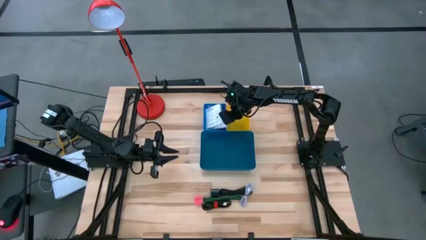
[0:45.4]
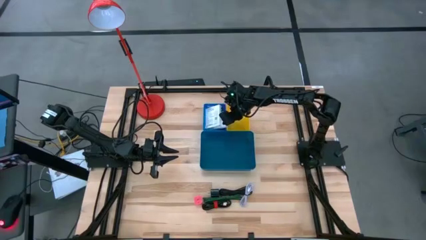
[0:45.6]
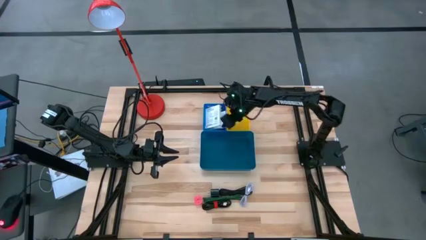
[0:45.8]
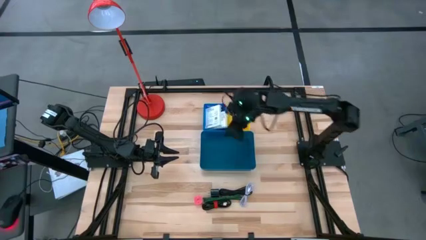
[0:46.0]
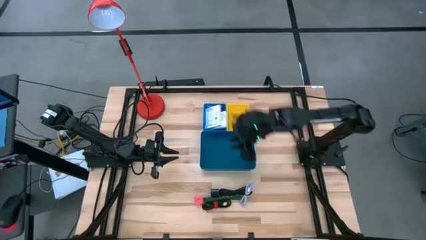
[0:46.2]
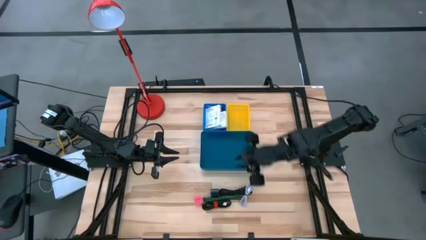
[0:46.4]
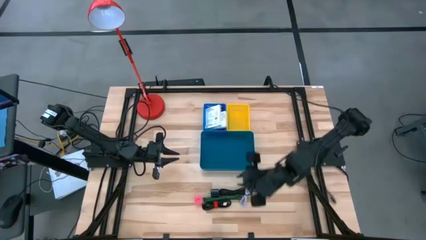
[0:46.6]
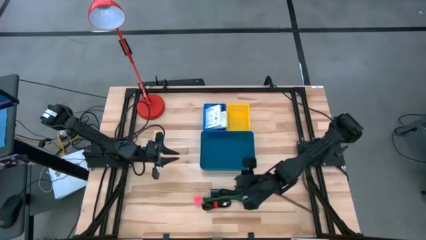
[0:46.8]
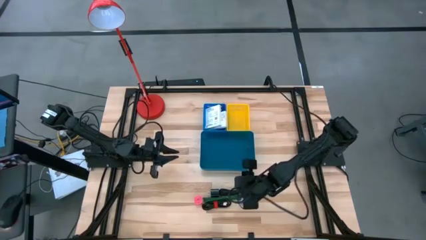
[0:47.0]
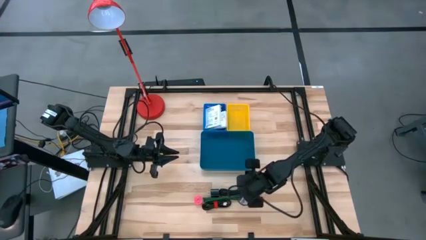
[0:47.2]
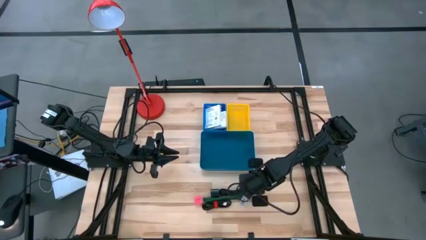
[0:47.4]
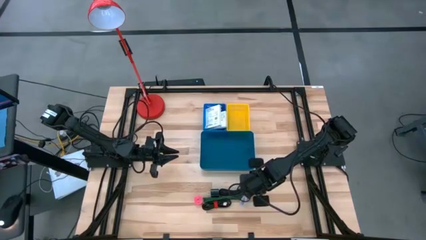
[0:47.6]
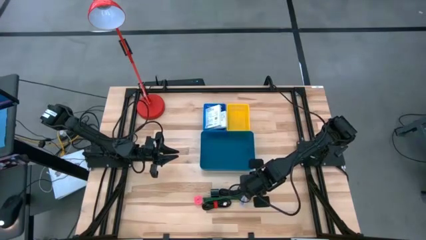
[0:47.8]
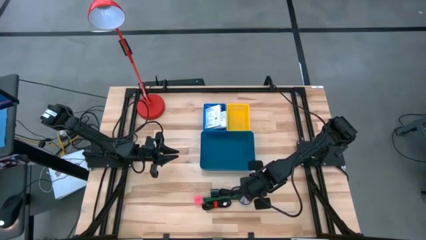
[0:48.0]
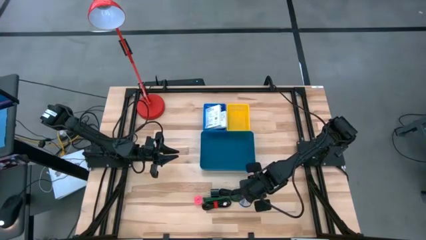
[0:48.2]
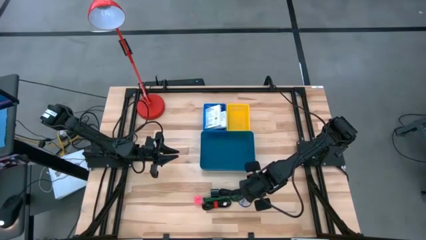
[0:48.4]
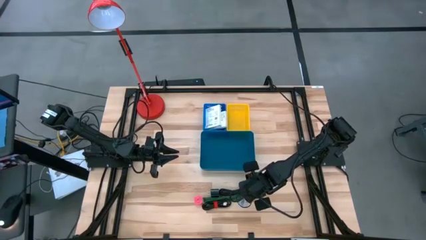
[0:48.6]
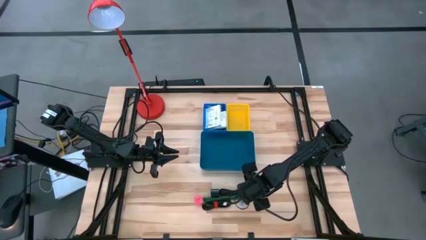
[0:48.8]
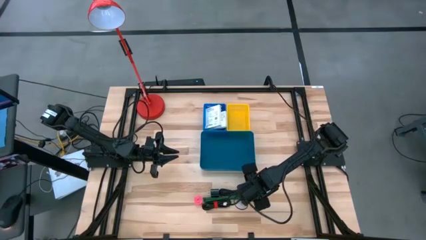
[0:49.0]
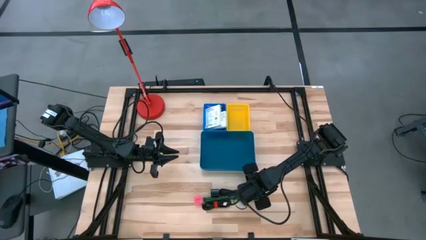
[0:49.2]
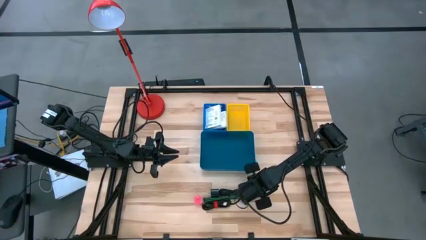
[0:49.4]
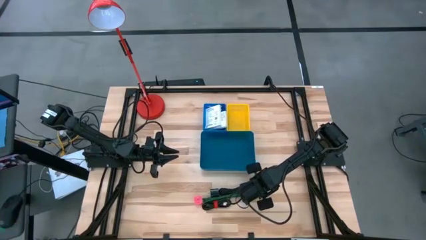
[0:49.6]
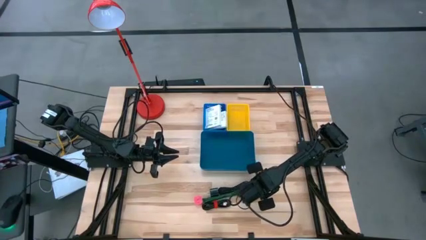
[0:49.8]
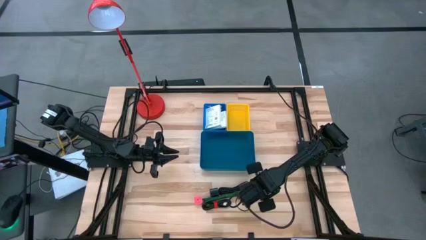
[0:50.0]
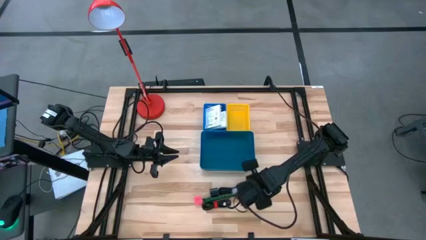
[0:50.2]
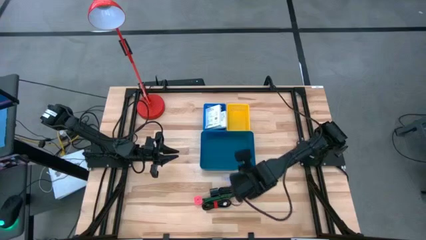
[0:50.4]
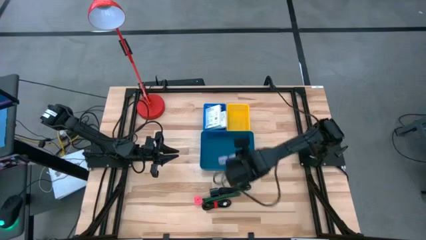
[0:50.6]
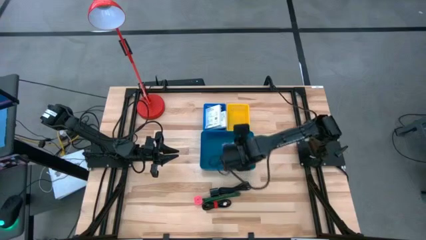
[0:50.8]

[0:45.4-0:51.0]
Task: Pick and place items into bin
Put the purple charger cable into the large blue bin

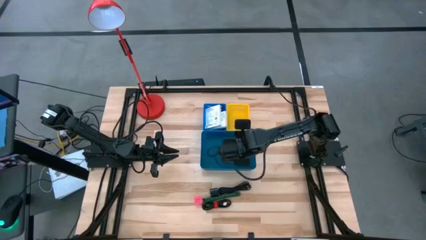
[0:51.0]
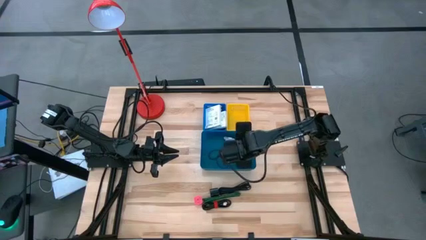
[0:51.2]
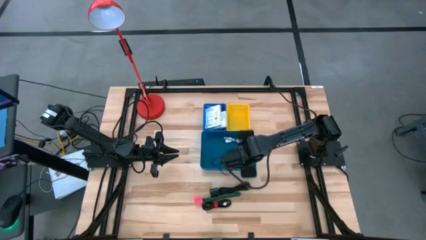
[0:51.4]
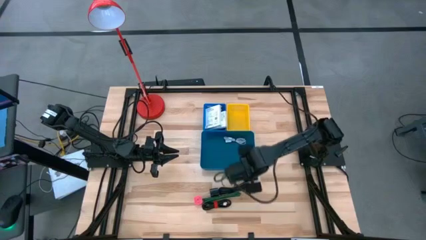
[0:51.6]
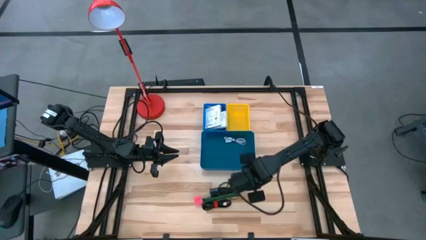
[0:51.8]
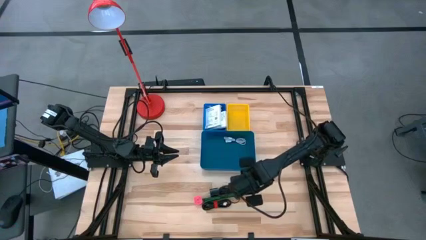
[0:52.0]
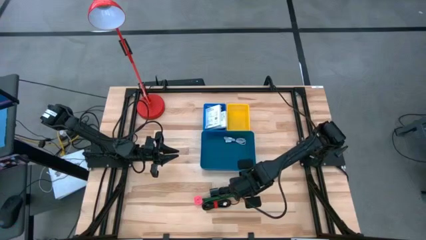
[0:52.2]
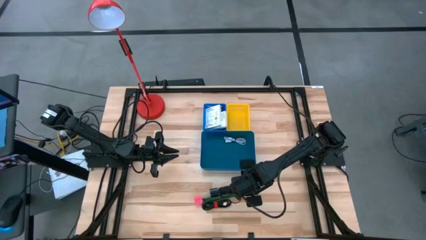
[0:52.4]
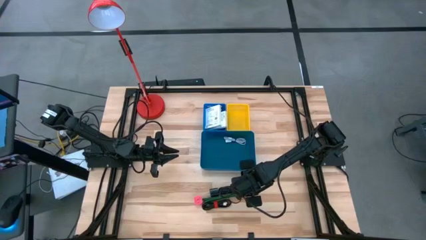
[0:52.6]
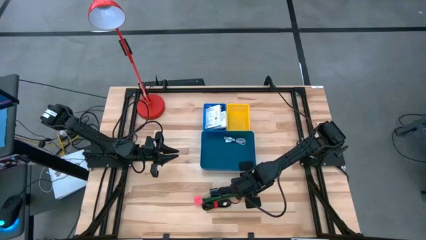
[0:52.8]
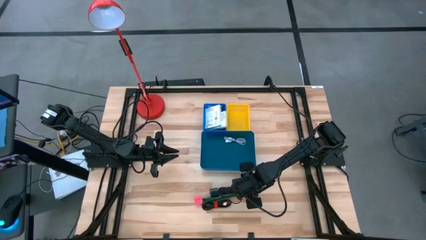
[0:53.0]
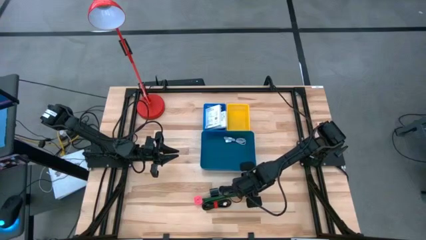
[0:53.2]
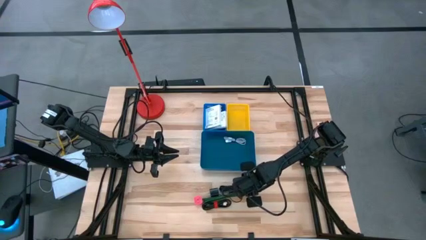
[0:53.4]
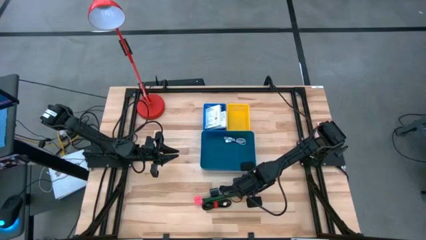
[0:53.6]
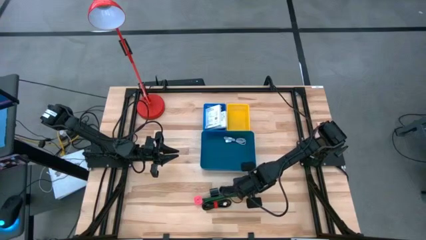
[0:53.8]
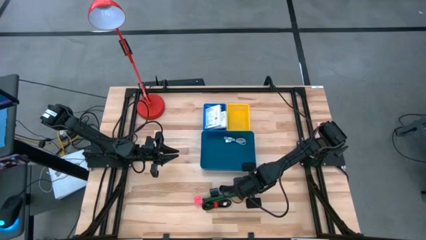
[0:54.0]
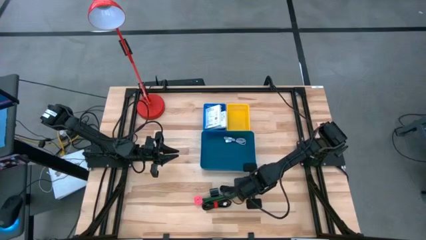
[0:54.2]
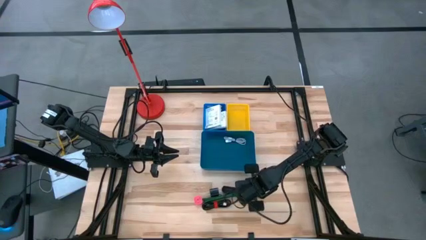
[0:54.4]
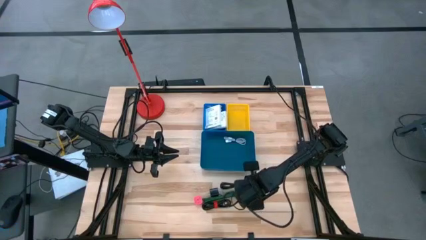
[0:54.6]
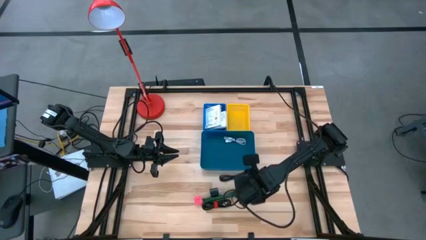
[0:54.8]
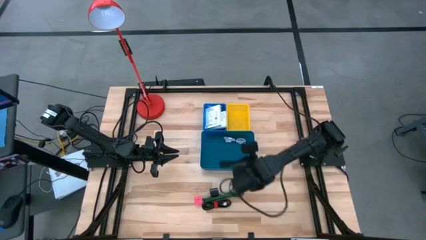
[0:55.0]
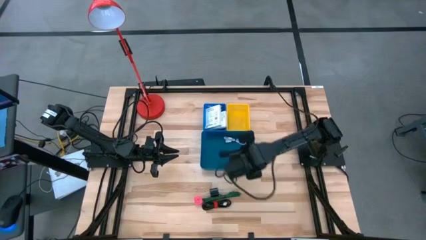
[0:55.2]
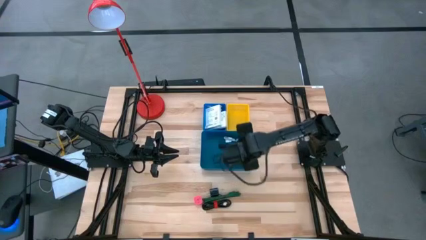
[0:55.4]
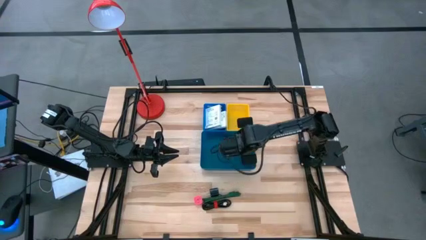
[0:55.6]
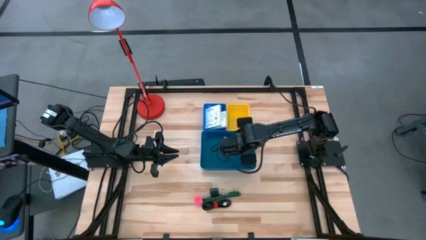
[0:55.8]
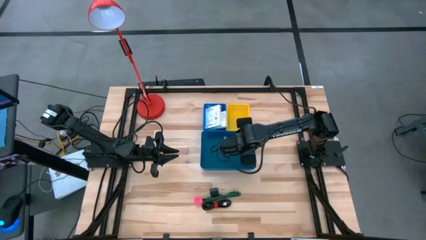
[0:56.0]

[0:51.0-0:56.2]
Put the top black charger cable into the large blue bin

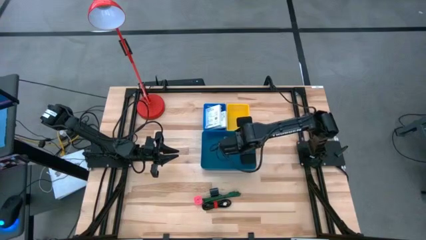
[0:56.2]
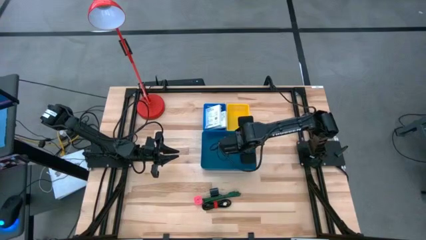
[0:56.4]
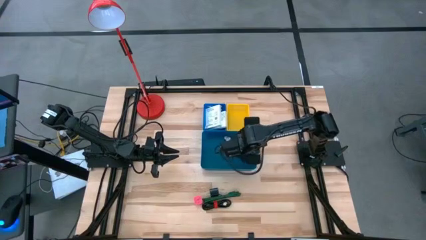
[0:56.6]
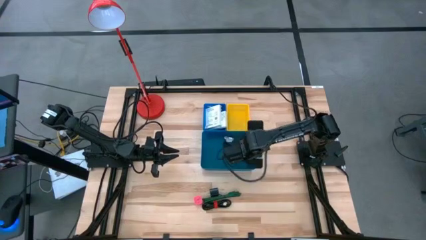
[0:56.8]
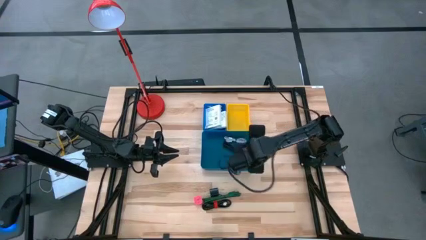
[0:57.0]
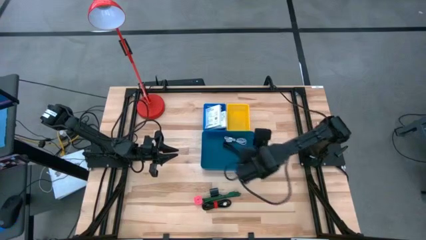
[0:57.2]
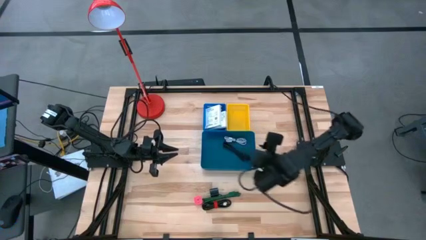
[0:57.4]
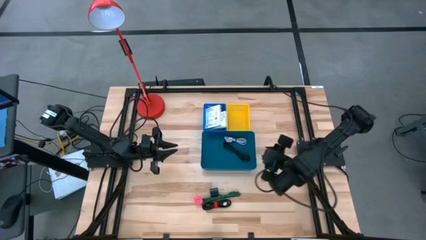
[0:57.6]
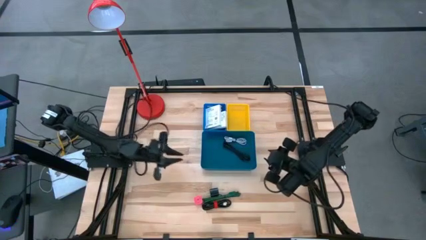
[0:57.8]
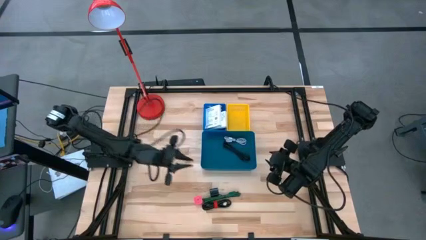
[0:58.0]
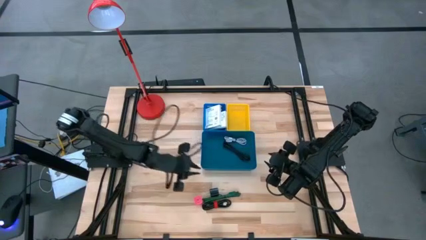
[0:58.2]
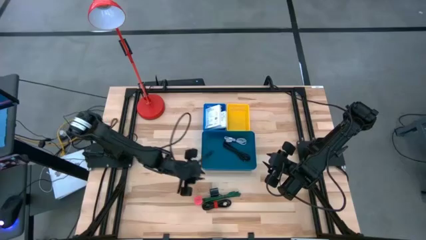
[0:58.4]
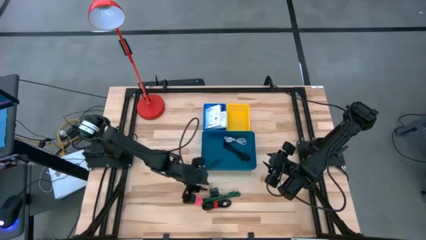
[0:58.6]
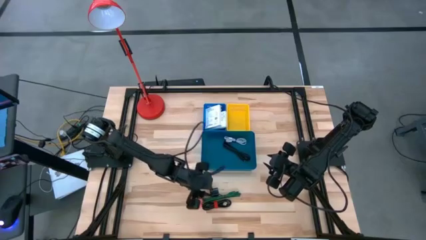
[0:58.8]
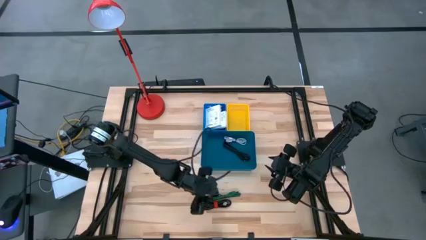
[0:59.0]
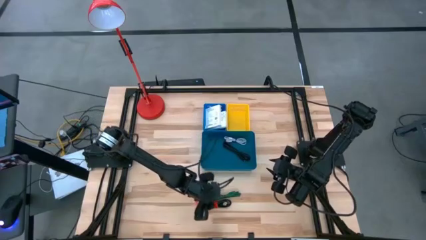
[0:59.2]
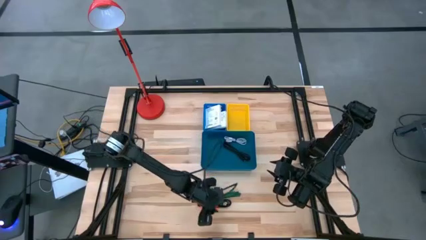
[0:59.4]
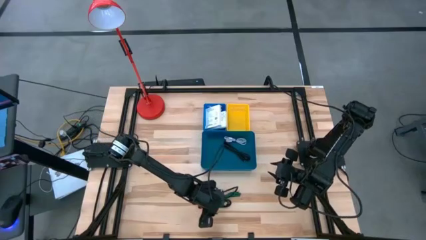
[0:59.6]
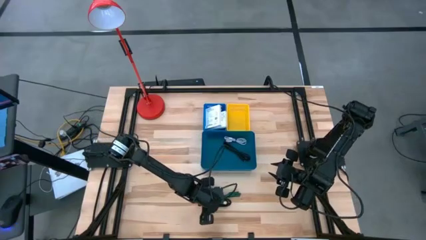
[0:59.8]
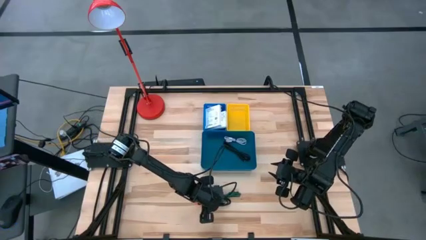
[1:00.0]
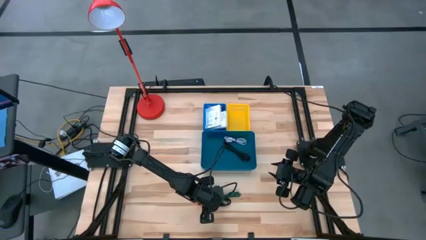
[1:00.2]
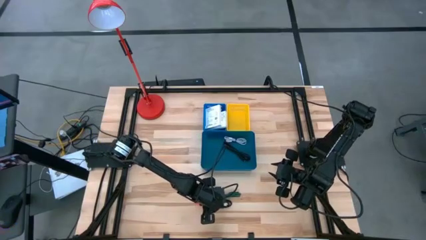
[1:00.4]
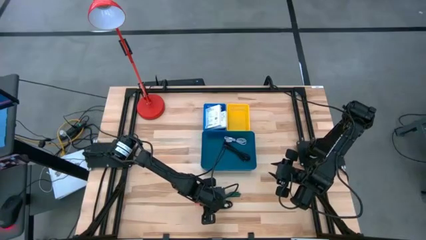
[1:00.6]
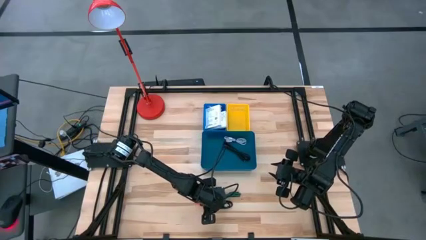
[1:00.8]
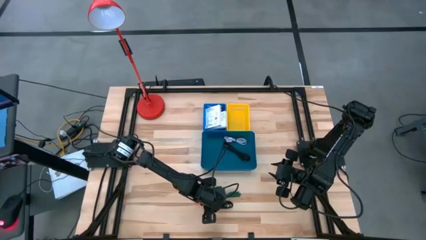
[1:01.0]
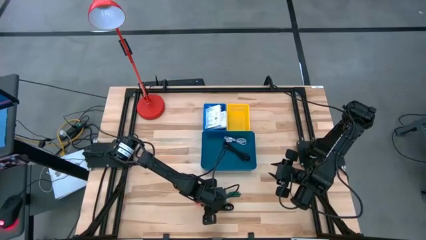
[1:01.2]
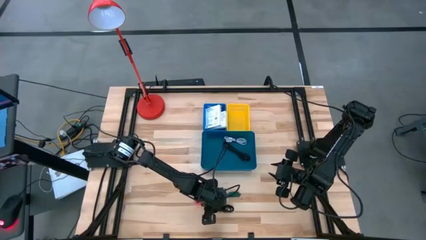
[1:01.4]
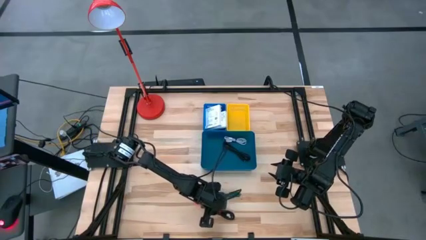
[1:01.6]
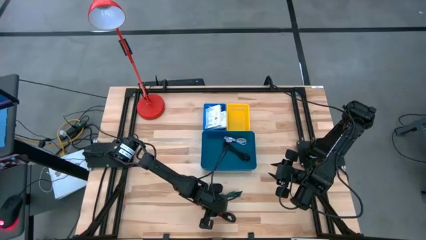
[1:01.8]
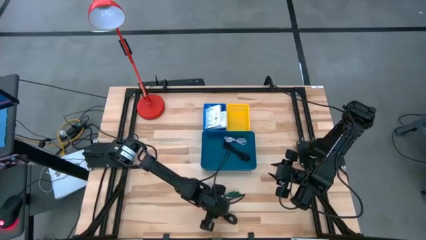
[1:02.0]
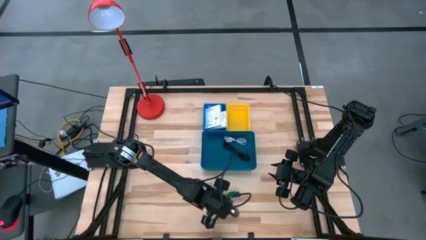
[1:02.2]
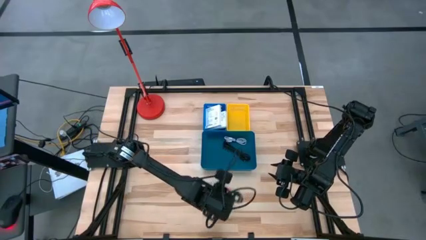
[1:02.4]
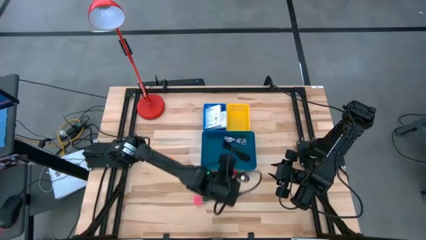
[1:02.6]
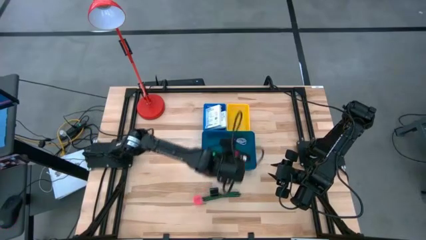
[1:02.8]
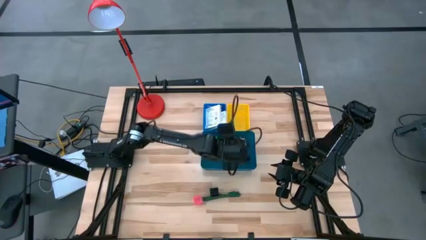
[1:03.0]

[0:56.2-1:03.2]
Put the black charger cable into the large blue bin
